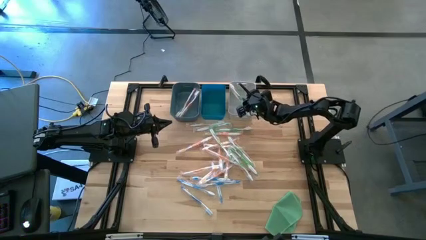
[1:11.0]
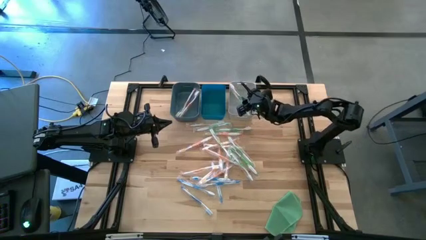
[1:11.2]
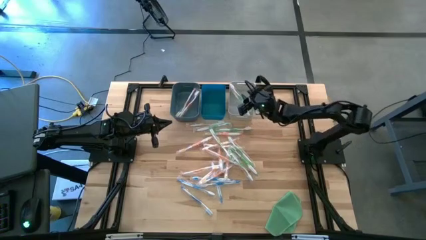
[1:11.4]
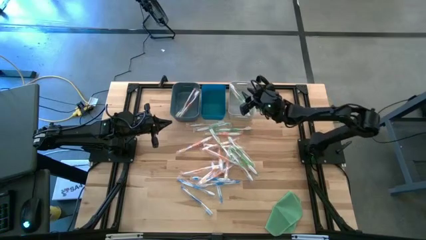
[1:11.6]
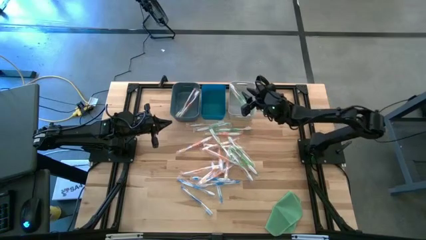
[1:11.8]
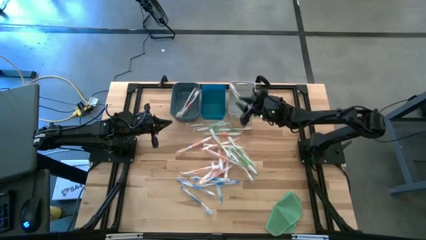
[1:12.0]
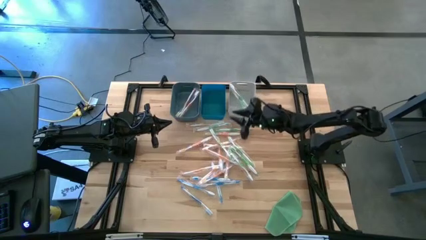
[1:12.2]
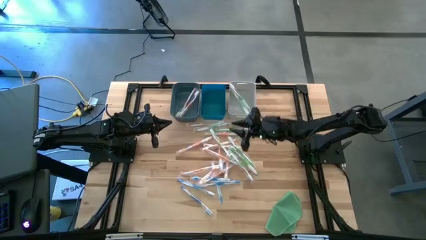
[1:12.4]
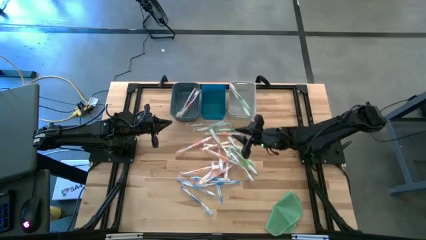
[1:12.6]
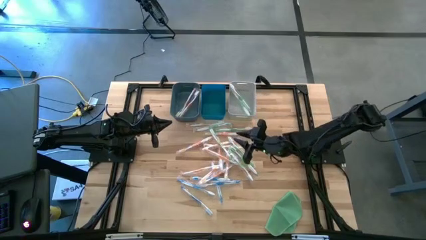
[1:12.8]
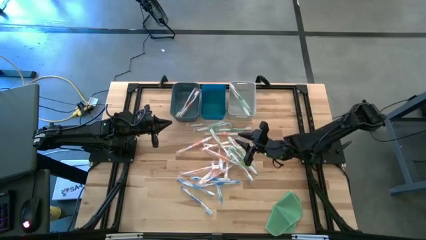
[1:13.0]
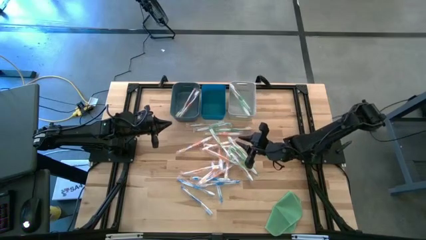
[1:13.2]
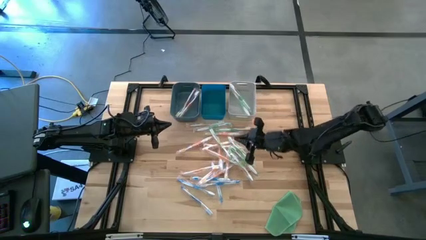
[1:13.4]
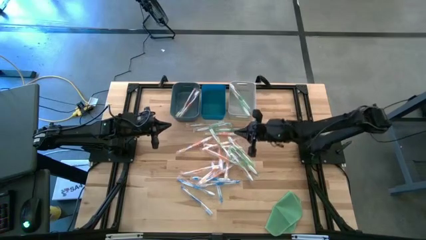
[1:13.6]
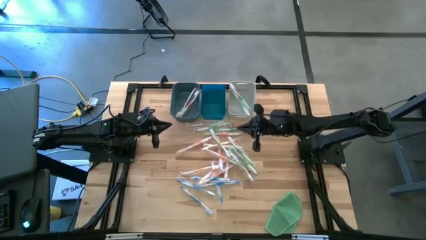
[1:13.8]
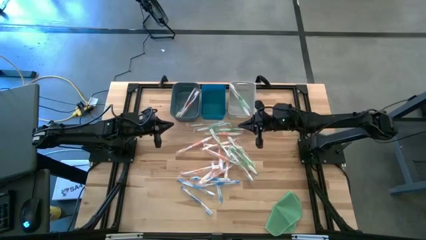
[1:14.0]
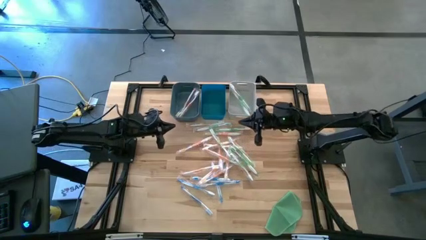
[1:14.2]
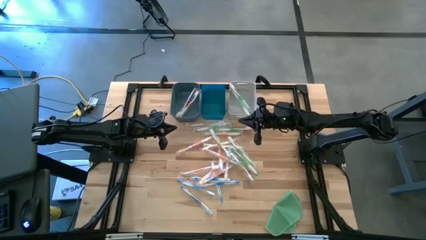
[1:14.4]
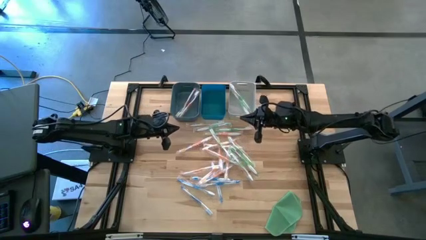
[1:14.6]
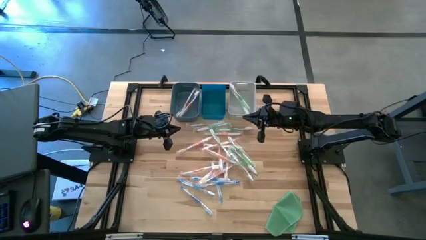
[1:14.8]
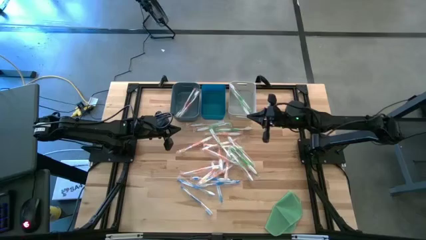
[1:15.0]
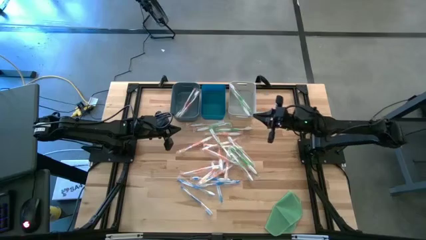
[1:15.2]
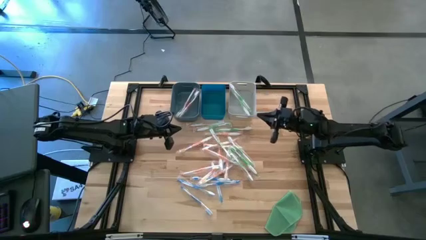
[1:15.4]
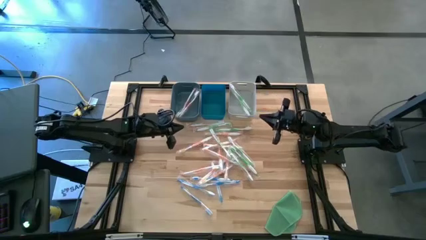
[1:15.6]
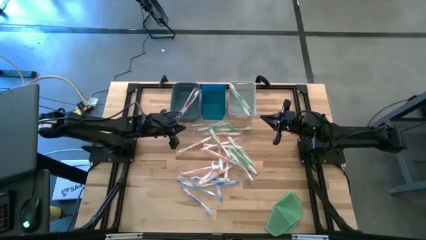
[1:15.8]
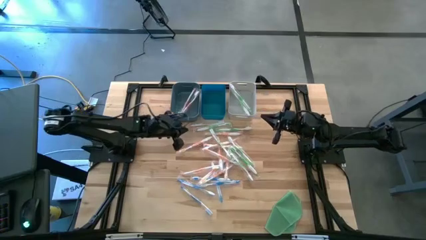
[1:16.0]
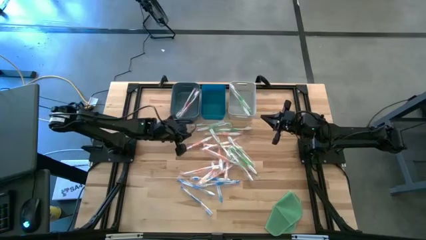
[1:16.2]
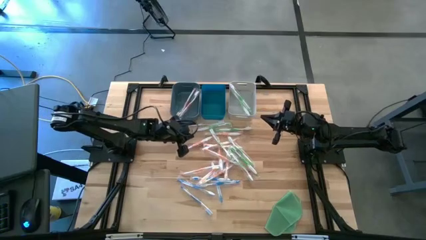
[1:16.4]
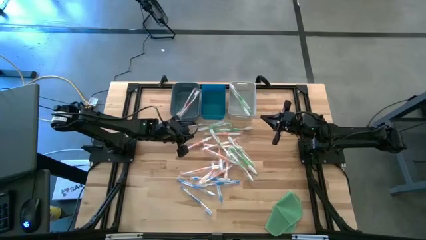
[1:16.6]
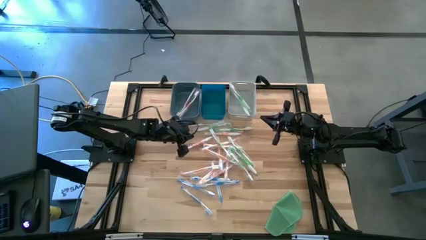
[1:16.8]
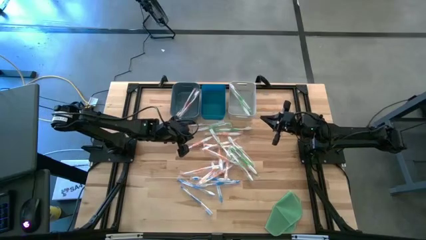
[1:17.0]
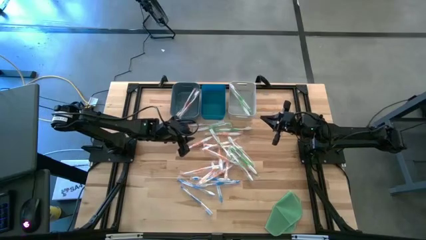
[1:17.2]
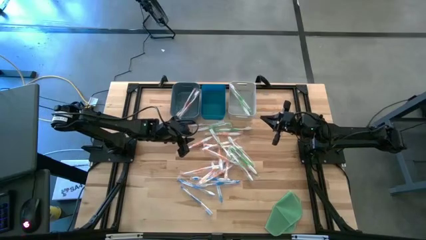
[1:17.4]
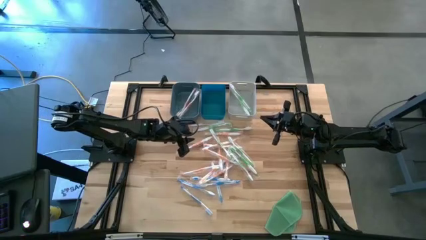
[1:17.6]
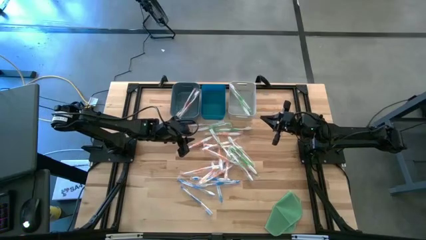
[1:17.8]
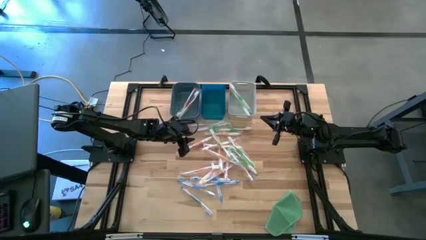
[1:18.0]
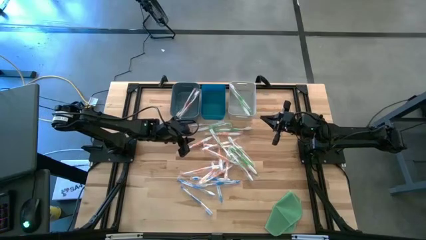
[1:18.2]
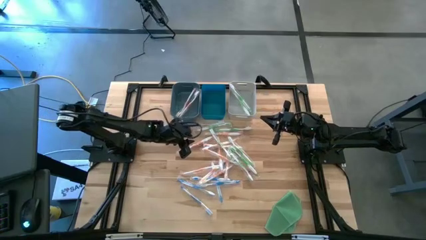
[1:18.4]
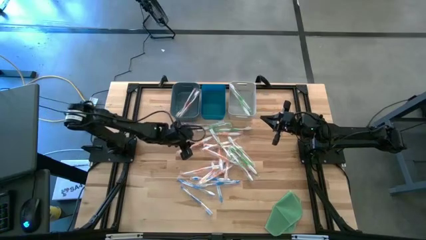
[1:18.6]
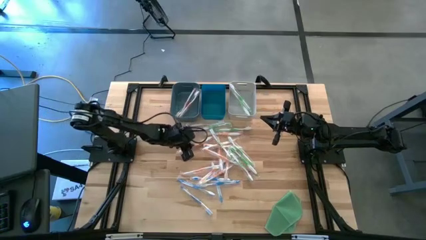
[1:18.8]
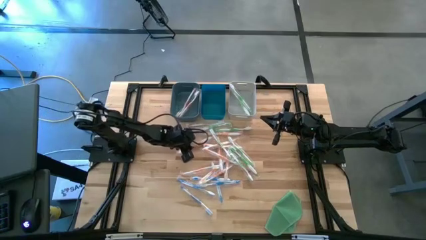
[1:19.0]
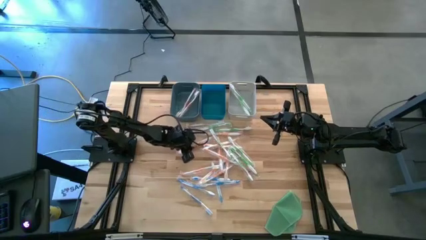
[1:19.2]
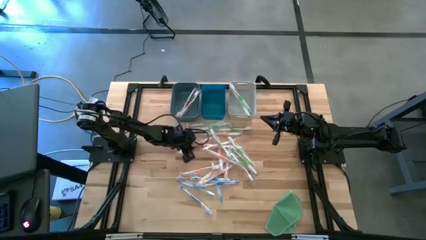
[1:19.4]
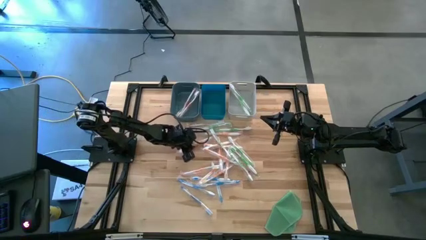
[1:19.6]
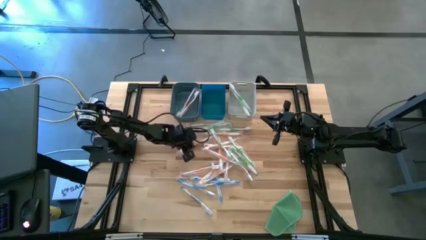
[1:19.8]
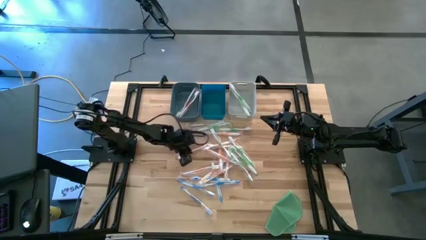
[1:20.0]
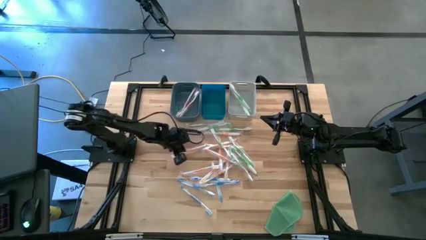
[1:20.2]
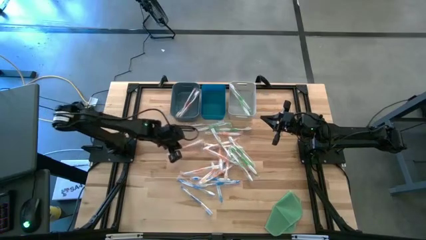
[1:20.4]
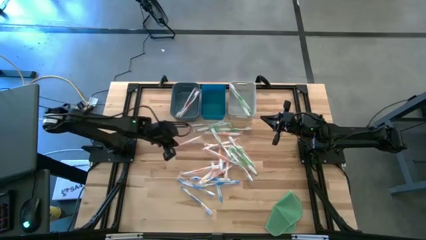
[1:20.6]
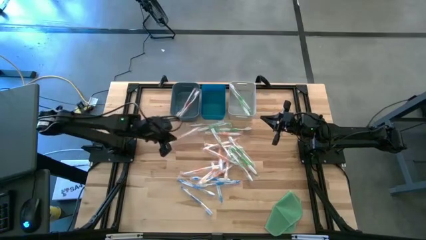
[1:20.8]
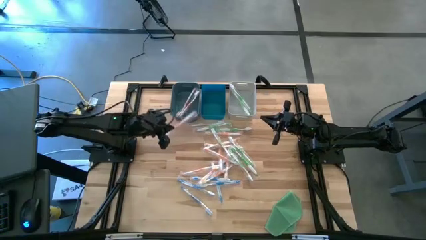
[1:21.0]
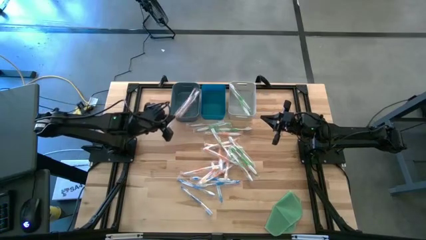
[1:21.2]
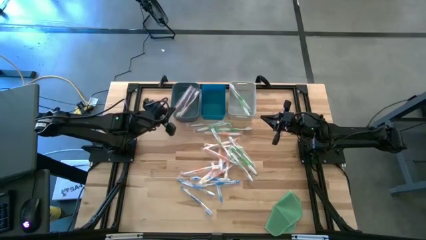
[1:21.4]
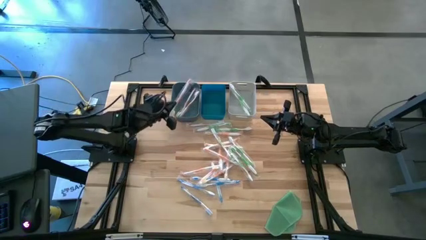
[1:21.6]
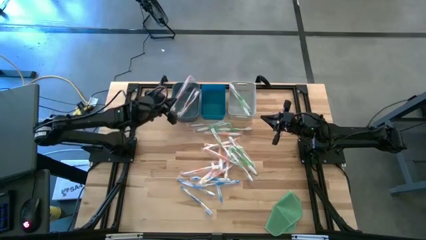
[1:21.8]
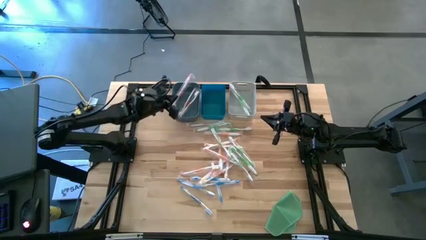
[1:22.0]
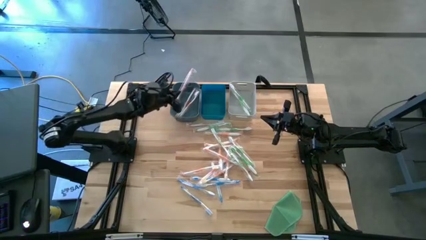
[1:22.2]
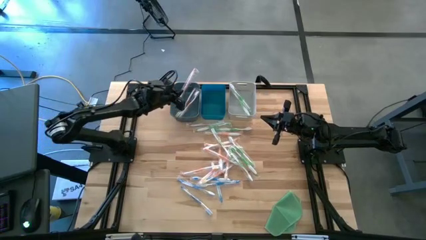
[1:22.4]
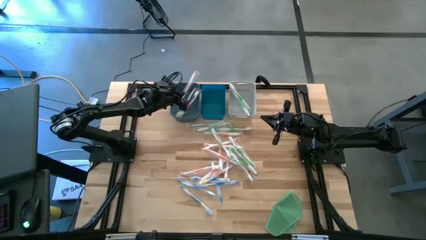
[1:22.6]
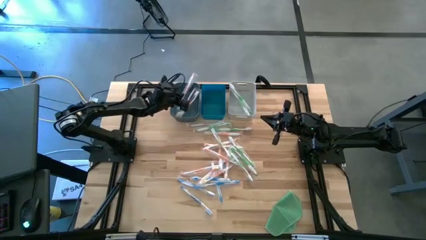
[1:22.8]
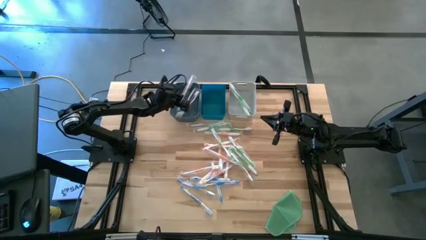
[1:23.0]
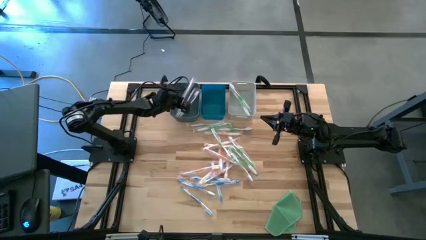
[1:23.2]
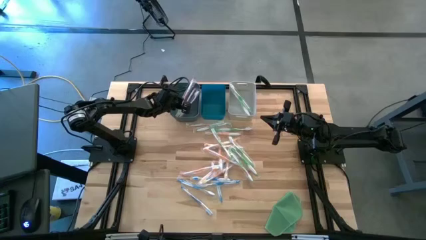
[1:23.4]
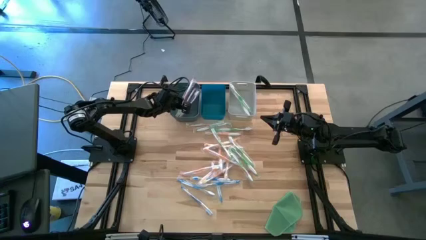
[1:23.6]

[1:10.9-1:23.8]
Task: Pick & Place Toothbrushes
Put the orange toothbrush into the dark blue bin

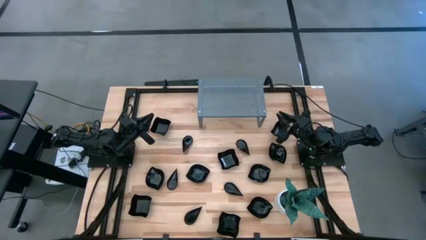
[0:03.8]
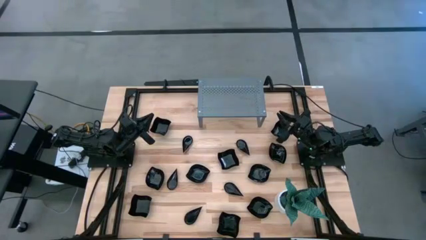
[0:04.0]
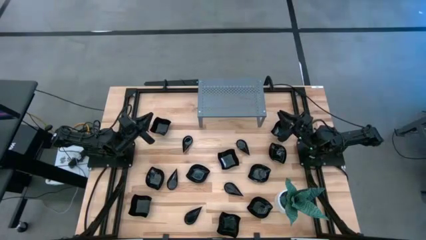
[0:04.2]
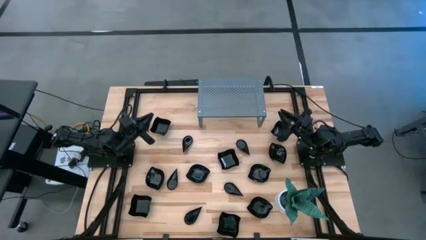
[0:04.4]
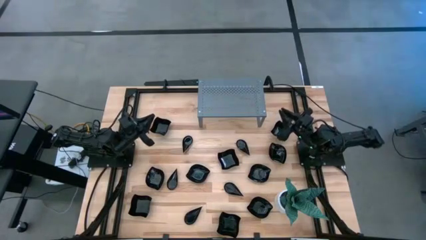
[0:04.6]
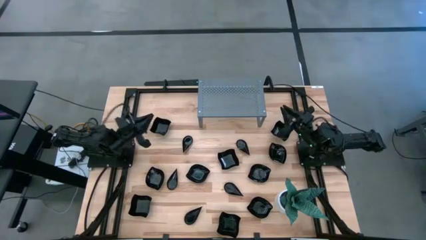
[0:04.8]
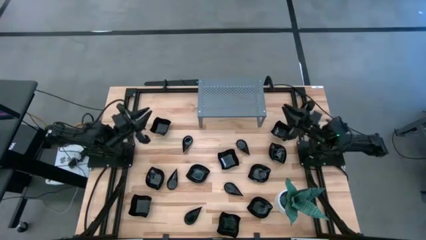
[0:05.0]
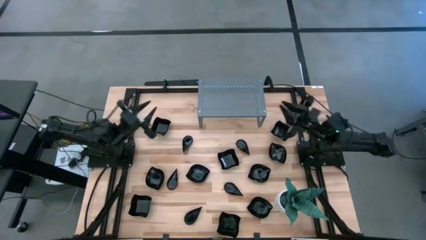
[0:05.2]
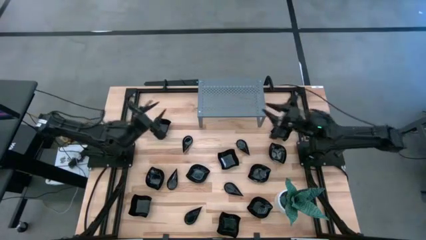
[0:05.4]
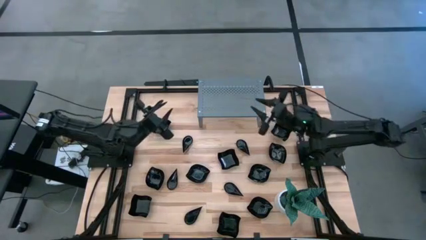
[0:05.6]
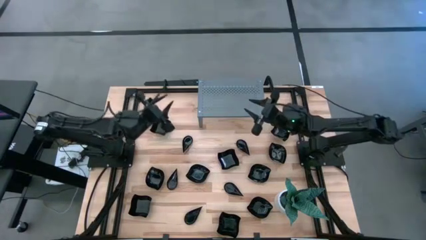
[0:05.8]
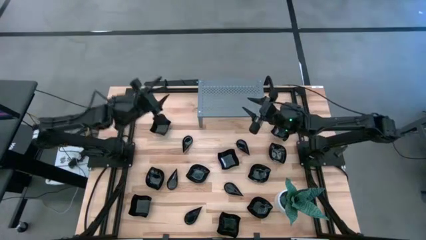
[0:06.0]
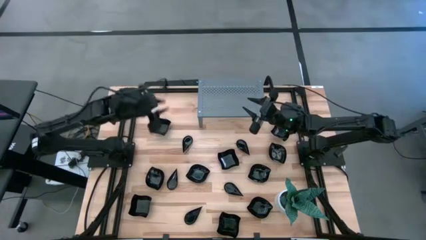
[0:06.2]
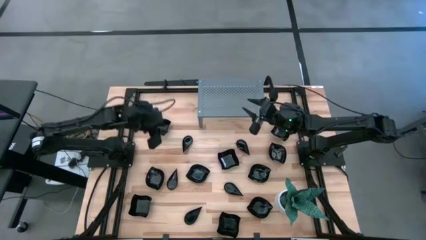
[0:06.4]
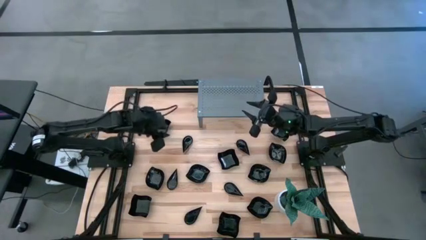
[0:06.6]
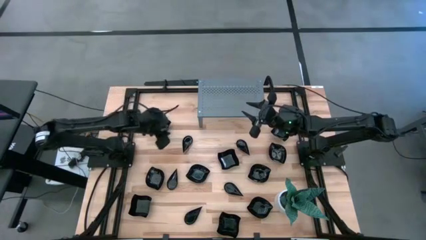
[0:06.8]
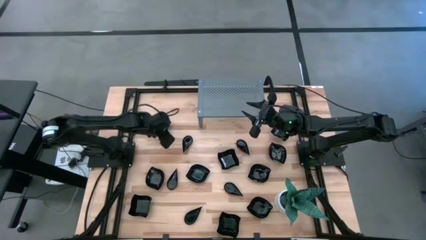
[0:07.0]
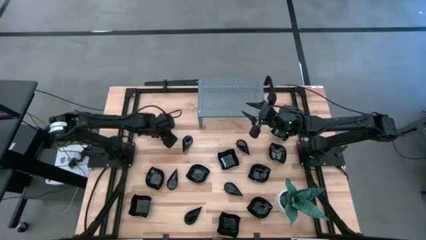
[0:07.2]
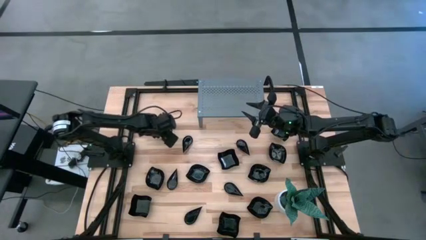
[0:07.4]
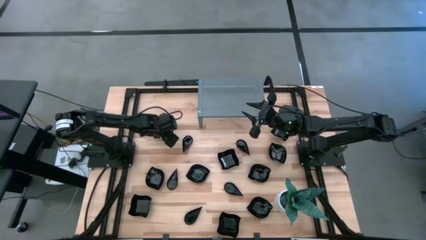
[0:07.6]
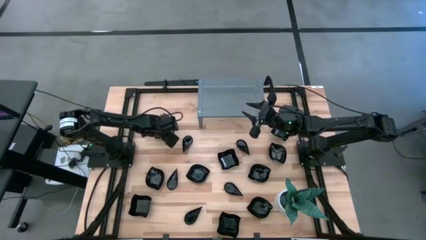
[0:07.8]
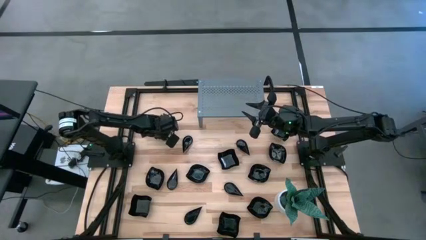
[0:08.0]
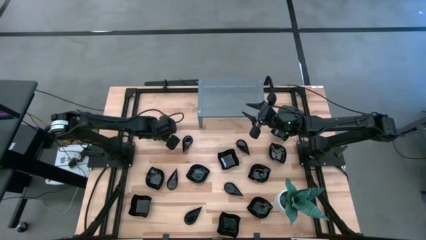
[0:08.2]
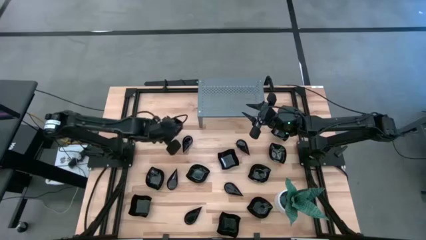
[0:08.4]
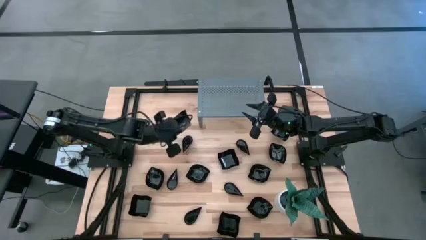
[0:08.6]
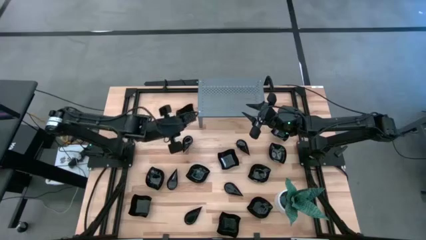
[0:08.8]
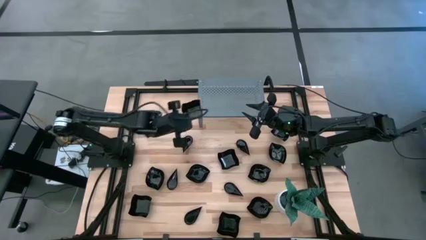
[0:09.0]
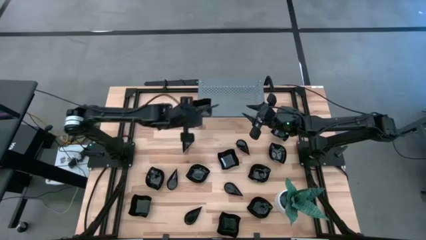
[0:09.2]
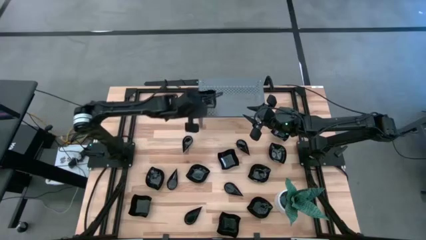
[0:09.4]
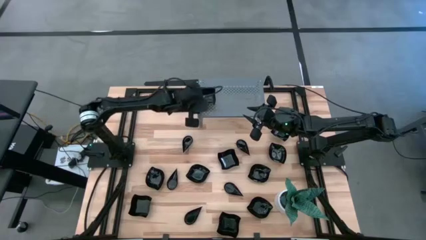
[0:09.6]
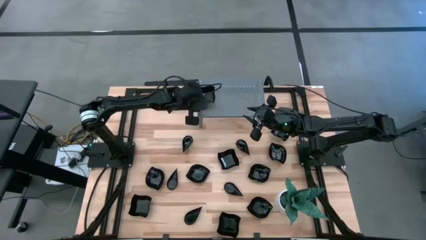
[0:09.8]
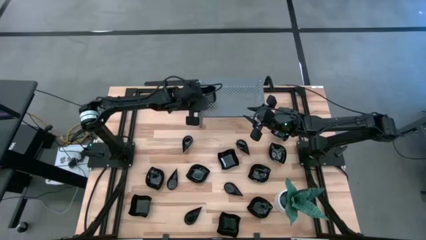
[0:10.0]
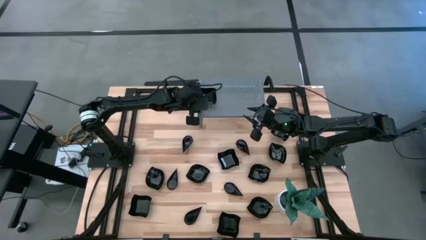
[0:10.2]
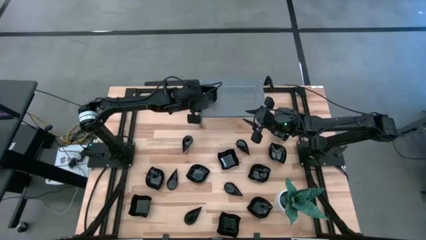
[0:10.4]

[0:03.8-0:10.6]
Task: Pick & Place Mini shaped plates
Put the distorted square plate on the shelf
